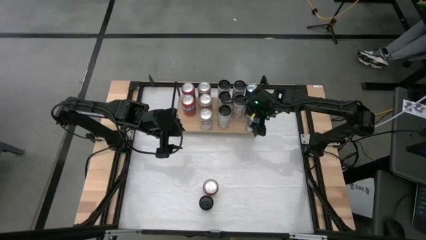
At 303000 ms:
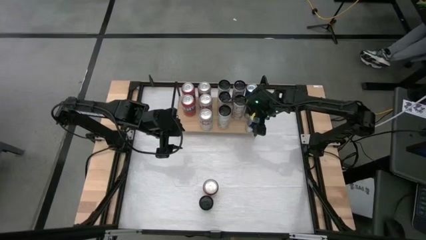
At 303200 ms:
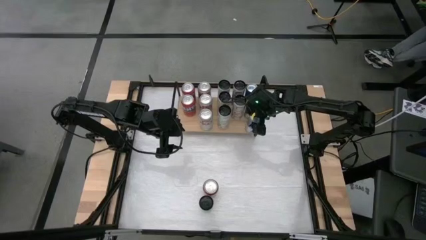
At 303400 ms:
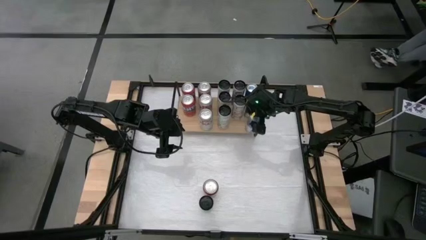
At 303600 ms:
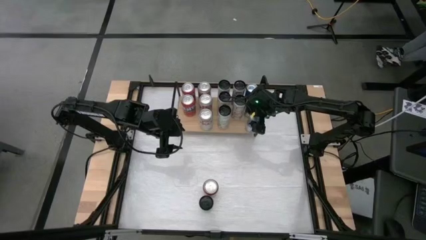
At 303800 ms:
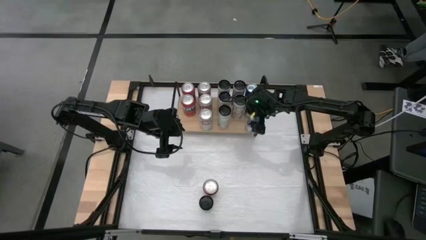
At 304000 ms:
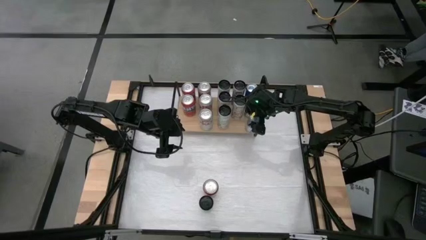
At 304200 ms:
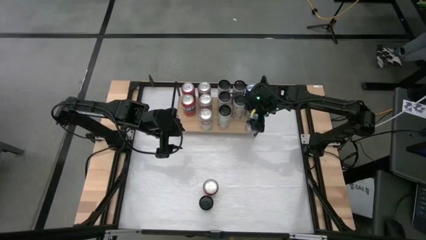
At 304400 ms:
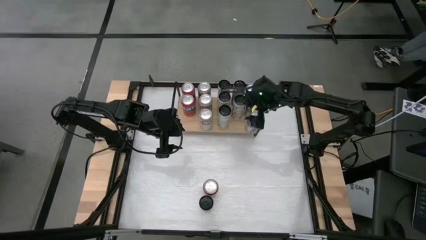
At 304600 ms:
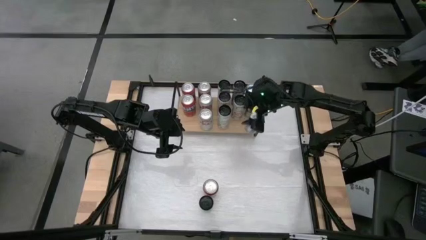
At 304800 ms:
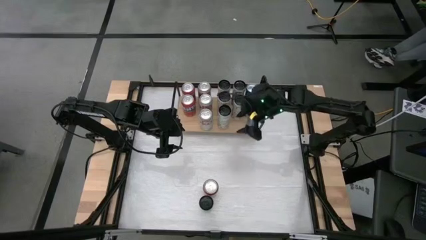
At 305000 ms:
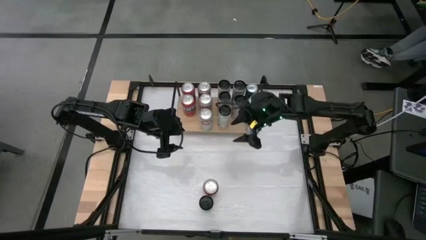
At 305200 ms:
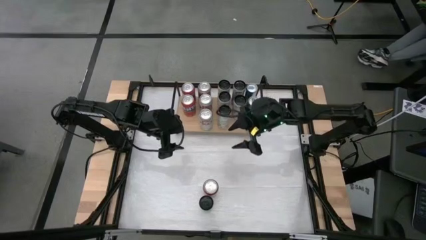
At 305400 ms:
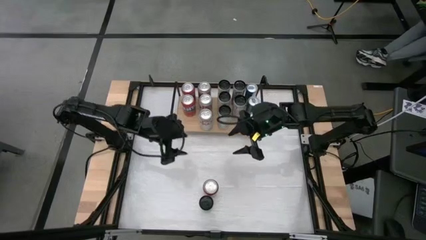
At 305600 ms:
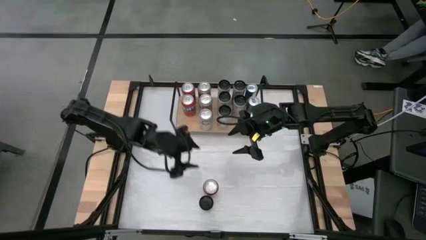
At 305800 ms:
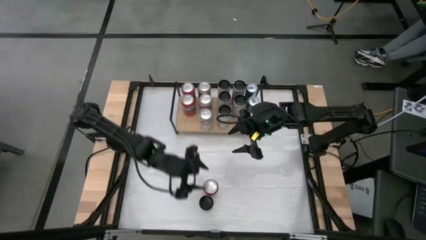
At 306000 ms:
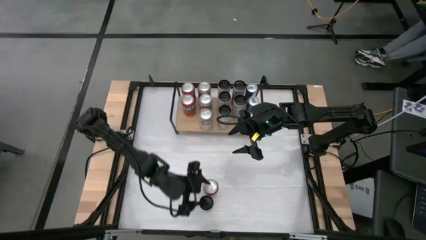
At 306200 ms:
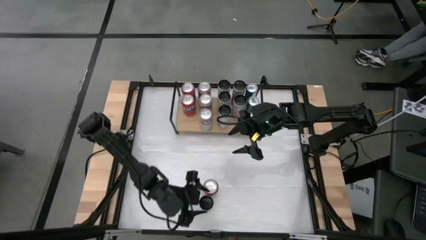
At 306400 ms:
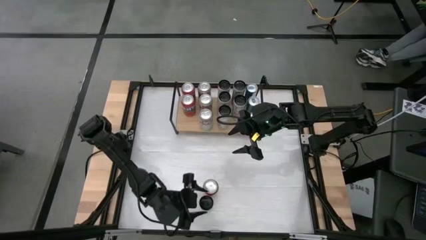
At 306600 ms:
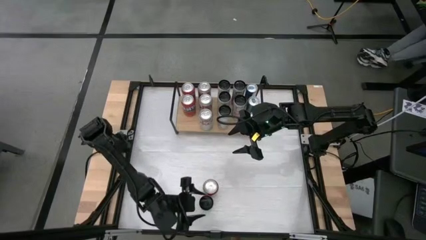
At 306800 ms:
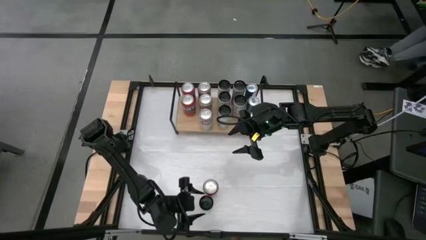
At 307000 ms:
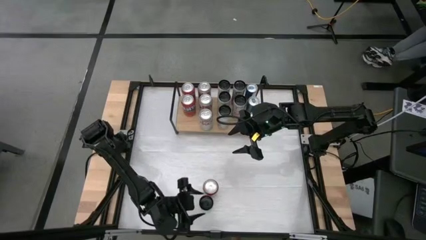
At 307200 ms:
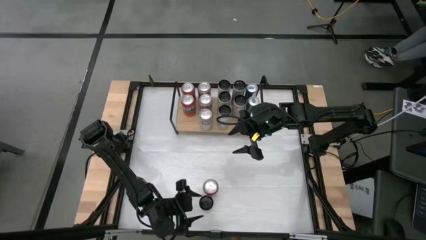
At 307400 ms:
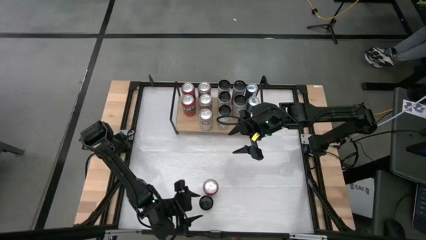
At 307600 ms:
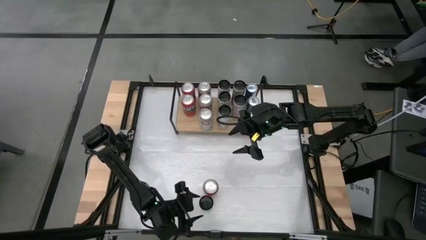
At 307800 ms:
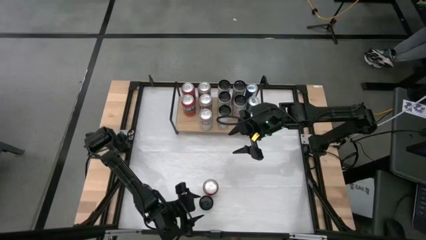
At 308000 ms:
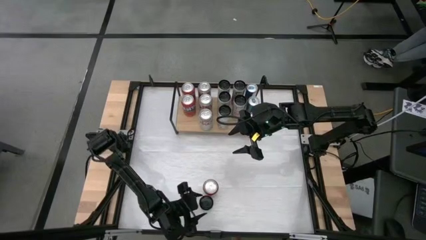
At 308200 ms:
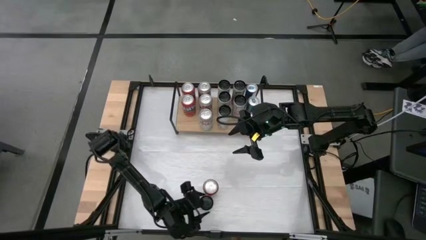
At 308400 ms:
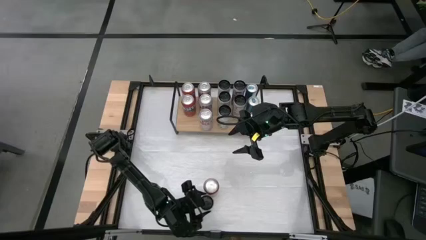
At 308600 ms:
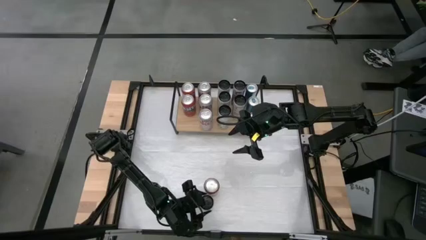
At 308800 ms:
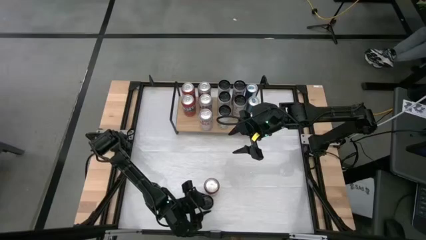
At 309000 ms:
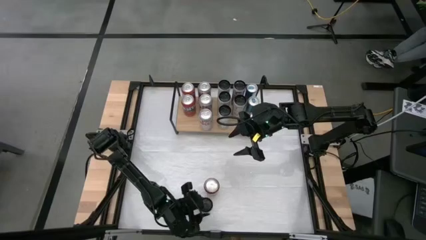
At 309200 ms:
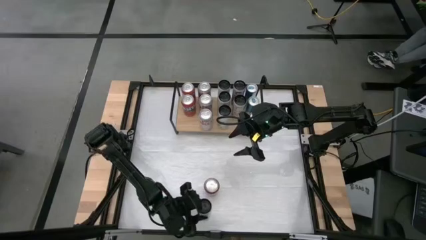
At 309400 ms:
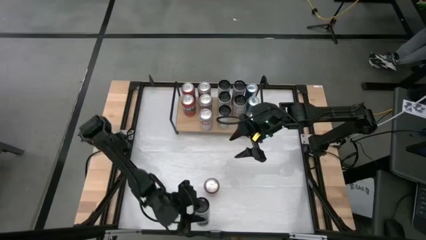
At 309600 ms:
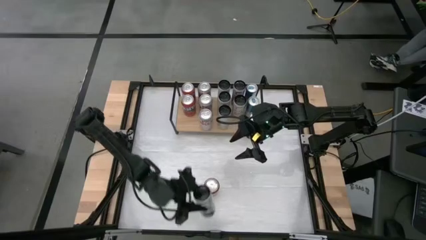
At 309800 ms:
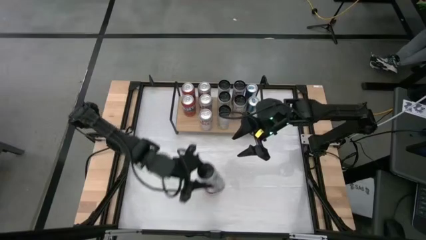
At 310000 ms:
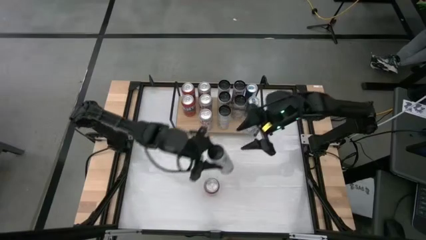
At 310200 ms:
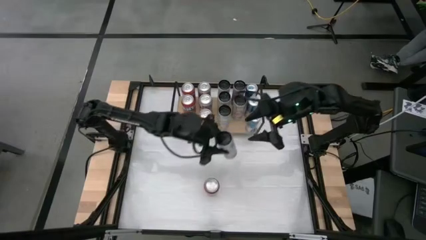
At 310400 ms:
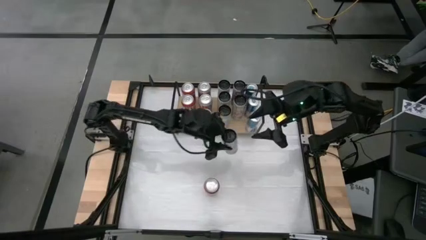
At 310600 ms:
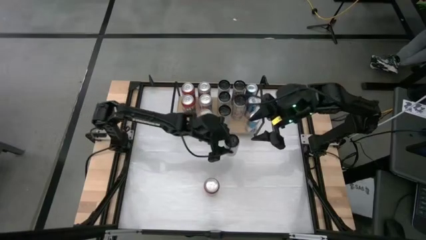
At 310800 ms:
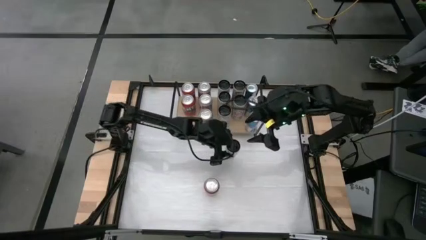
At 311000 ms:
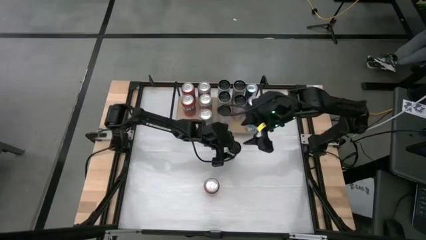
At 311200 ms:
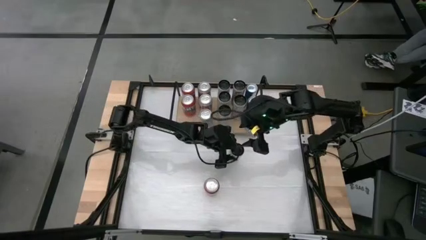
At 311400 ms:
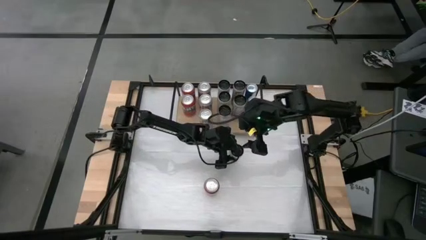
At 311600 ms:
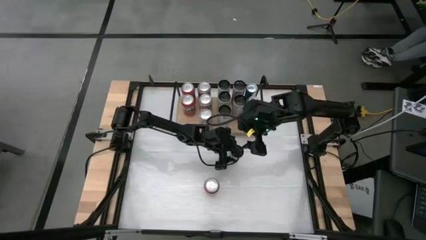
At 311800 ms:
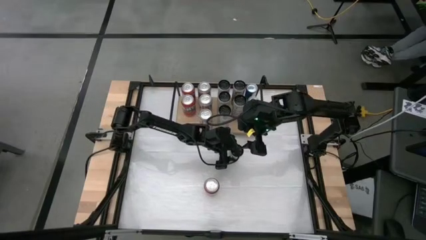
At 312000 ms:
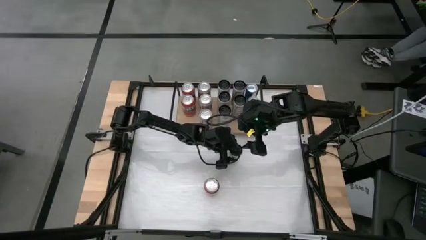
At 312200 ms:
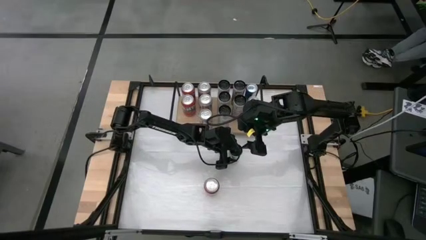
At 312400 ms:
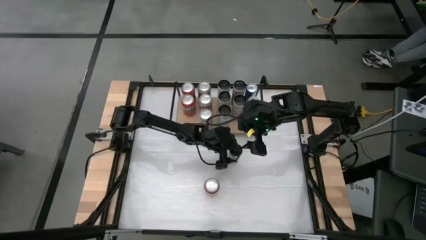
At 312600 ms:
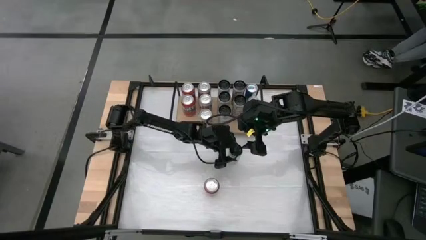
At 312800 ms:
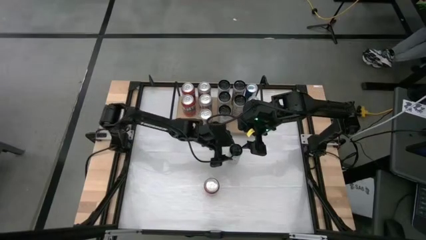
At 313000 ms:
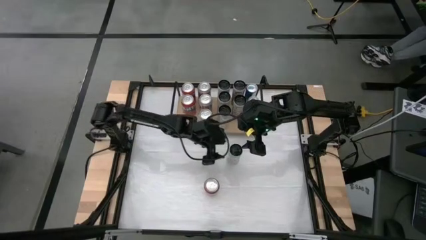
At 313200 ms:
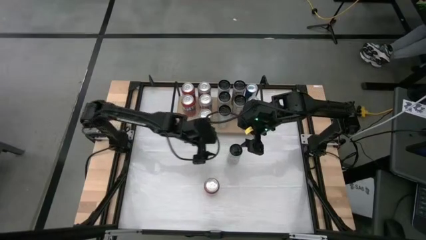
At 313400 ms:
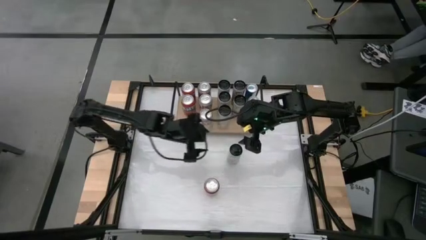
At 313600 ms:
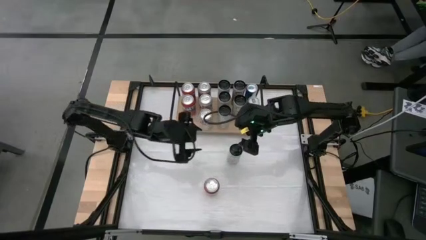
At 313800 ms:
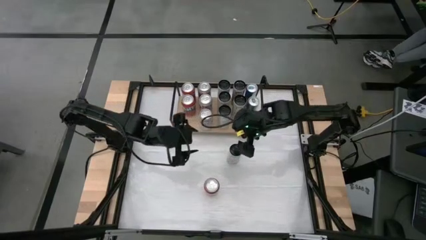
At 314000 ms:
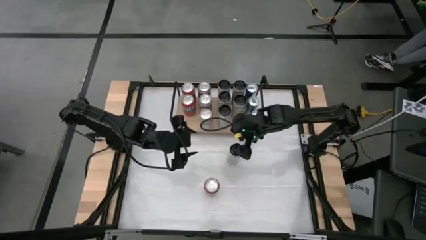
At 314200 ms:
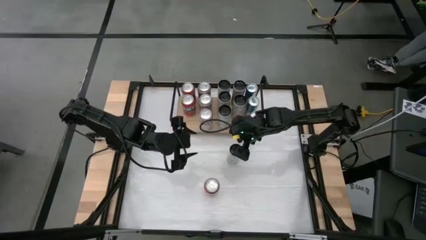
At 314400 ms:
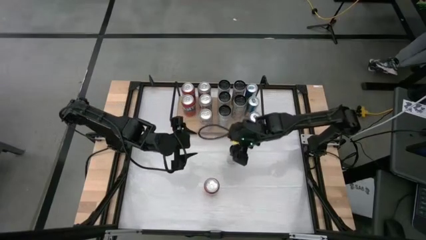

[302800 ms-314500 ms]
Task: Place canned beverage on shelf
Put the white pink soda can onto the shelf aligned with the other white pink soda cans

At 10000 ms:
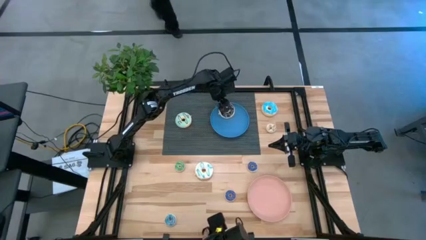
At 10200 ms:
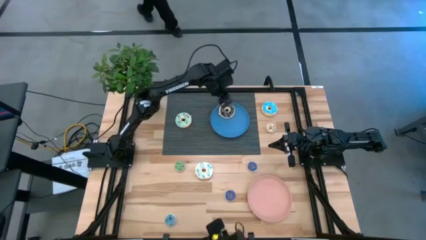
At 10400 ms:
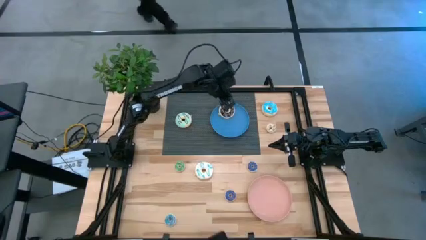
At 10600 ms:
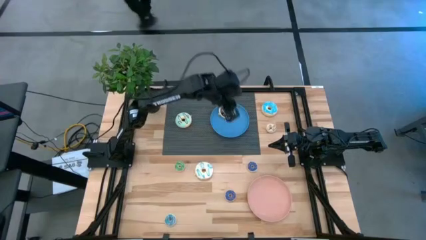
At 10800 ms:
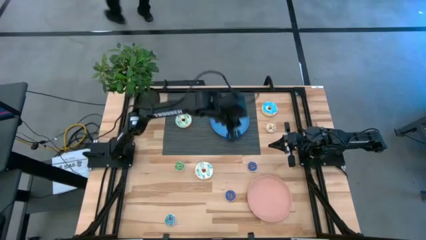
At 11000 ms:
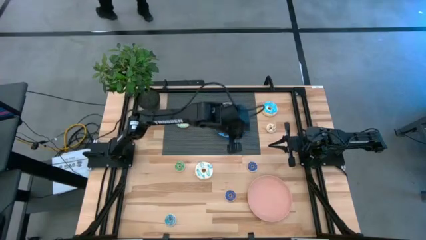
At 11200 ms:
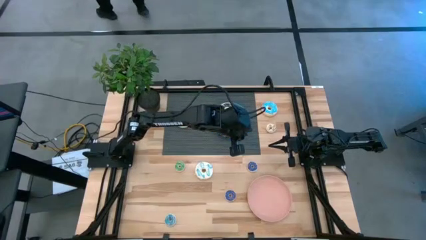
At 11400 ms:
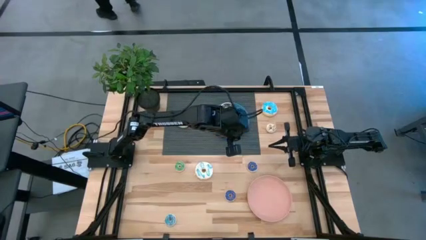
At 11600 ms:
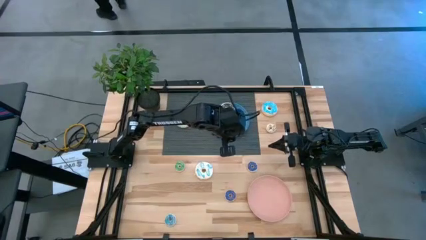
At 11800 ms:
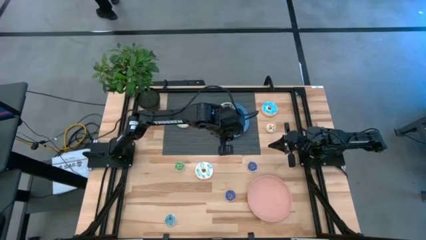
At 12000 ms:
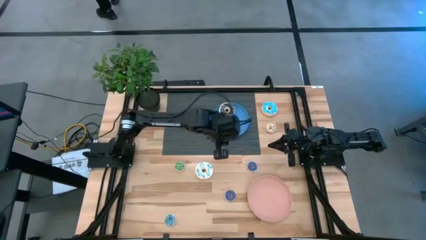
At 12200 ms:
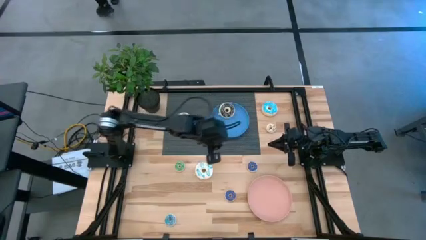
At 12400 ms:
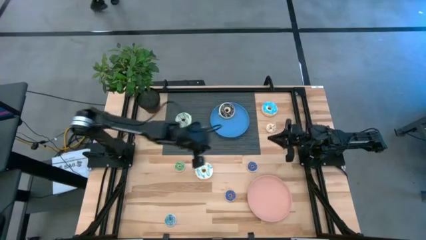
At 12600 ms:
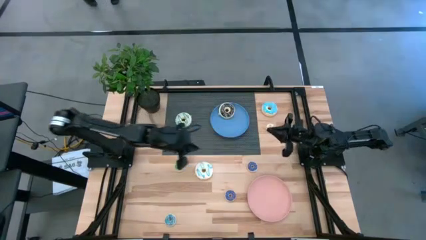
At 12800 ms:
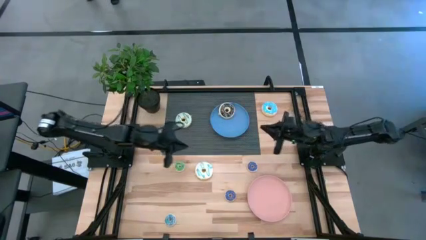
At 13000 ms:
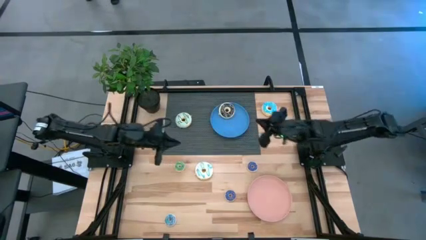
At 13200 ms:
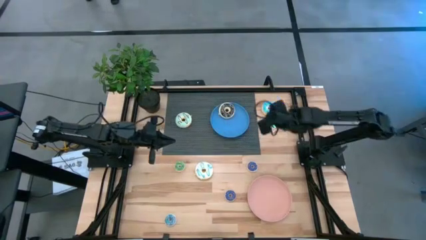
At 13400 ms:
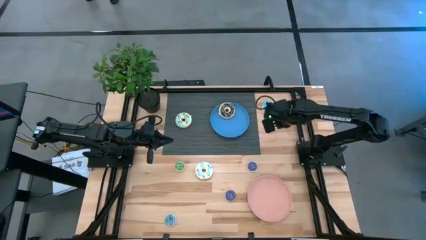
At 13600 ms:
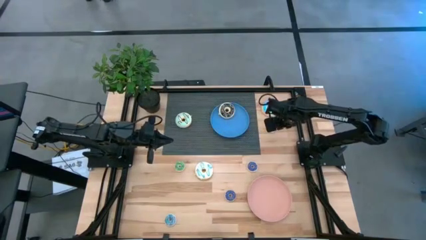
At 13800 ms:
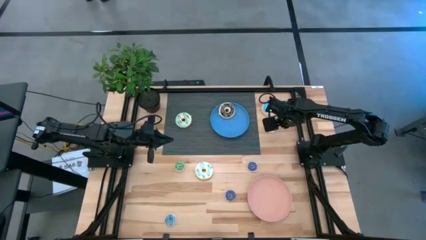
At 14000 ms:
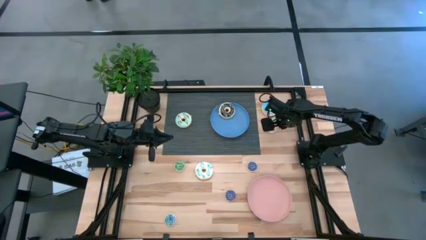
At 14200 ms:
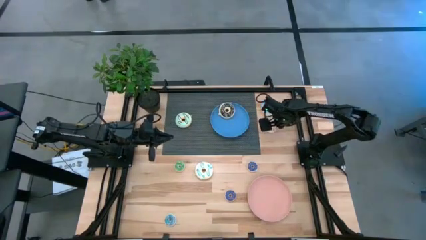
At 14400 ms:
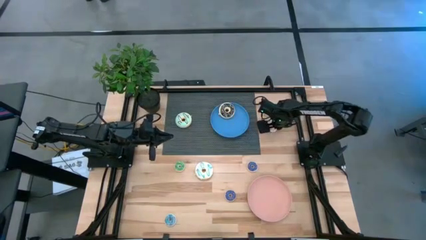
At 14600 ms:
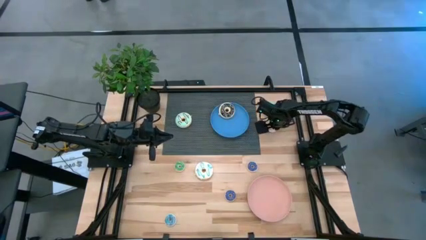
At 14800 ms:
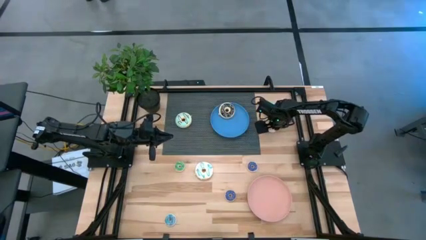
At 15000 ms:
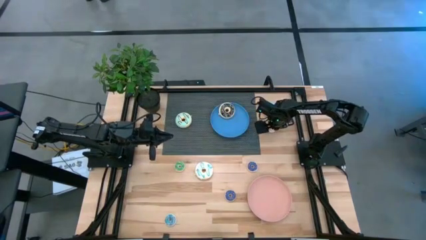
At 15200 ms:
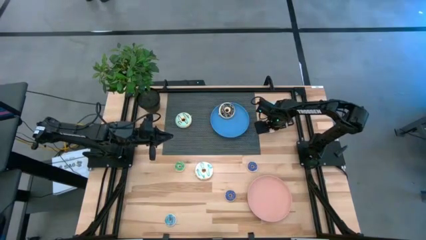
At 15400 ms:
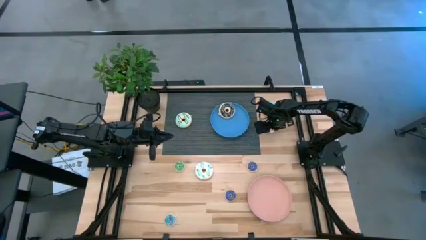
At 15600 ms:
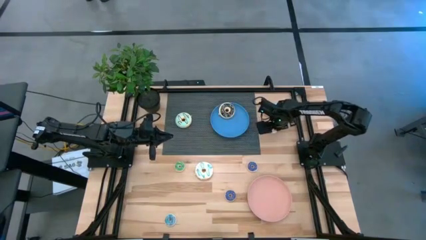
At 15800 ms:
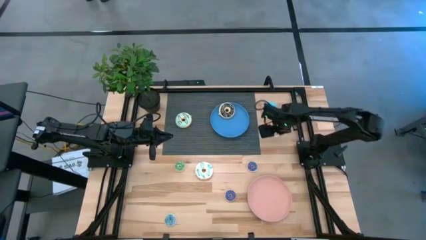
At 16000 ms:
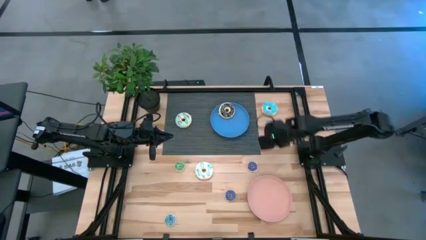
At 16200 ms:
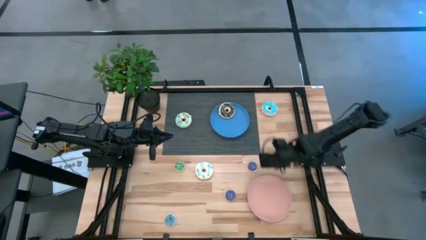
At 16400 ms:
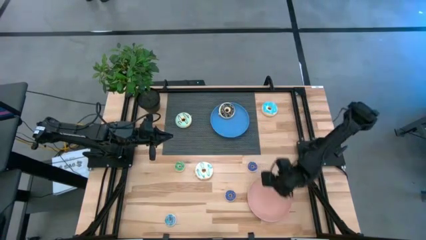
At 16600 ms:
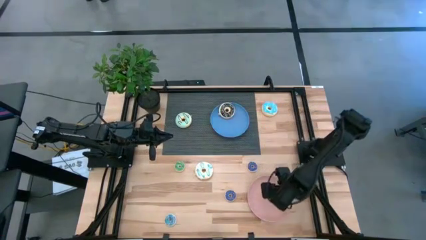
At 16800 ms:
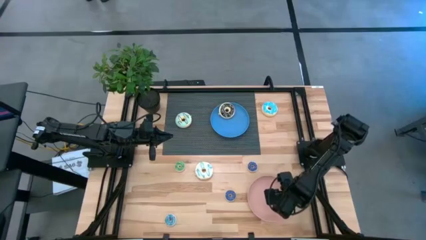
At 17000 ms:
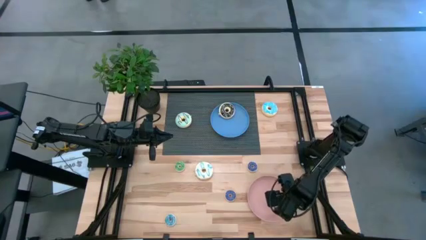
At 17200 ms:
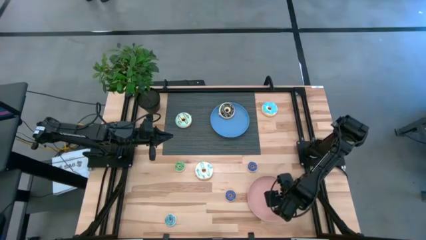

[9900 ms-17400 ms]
Task: Pick & Place donuts
Put the small white donut on the pink plate
